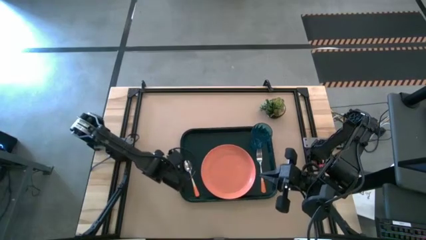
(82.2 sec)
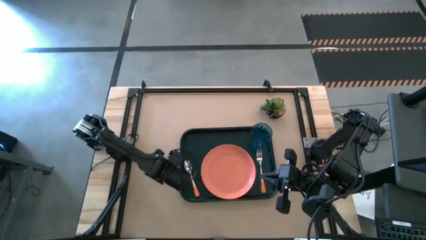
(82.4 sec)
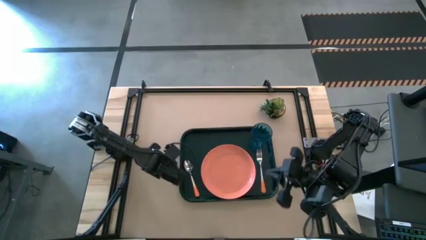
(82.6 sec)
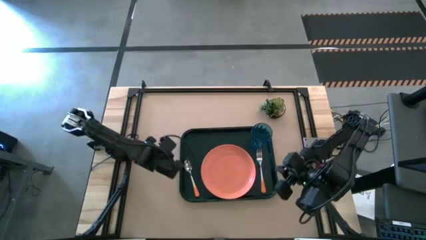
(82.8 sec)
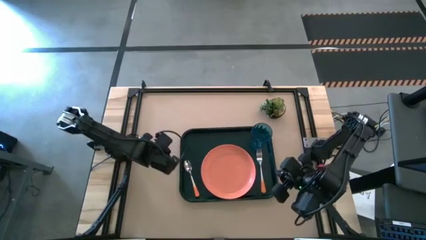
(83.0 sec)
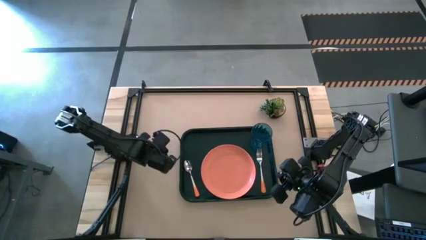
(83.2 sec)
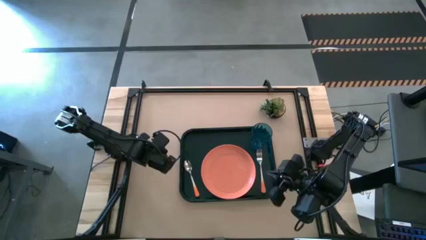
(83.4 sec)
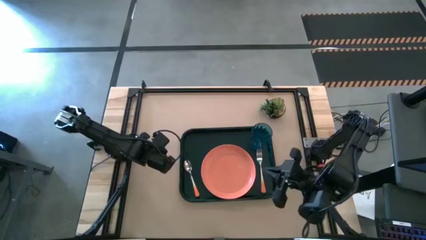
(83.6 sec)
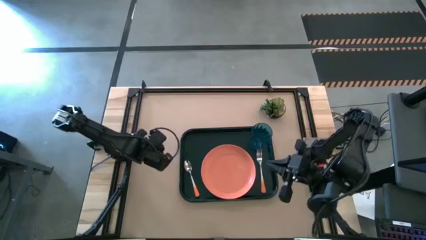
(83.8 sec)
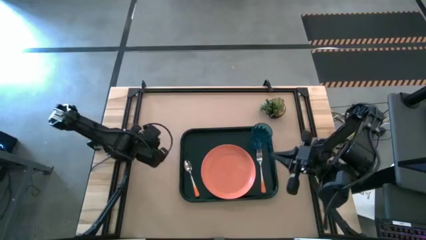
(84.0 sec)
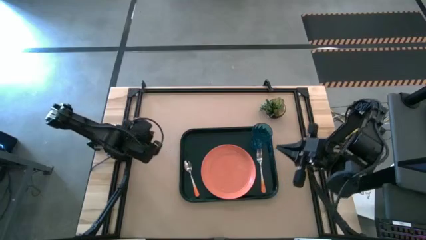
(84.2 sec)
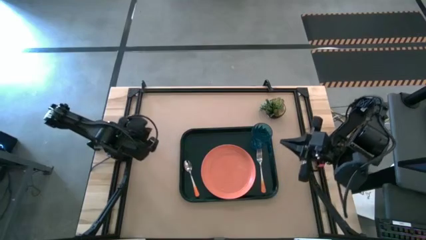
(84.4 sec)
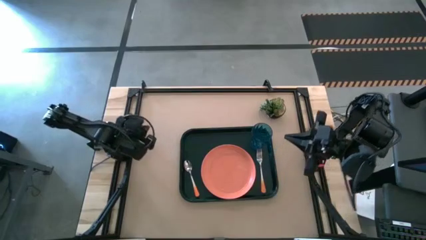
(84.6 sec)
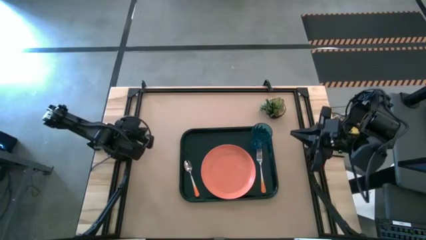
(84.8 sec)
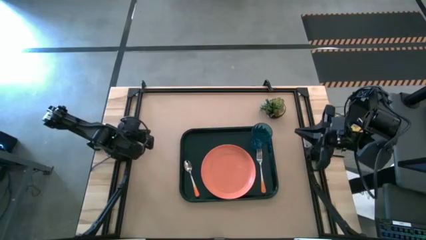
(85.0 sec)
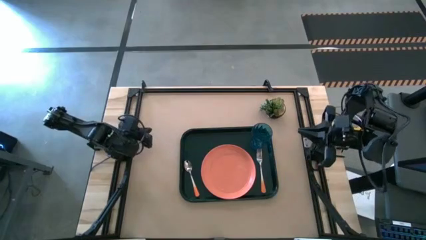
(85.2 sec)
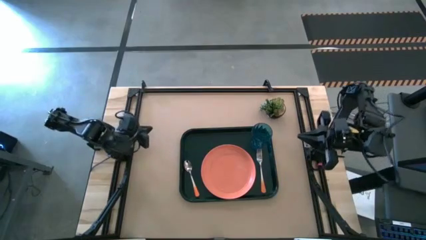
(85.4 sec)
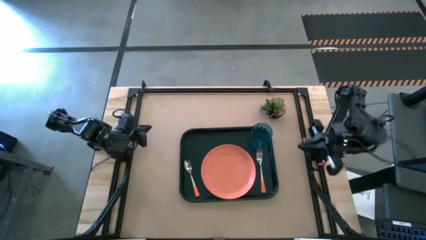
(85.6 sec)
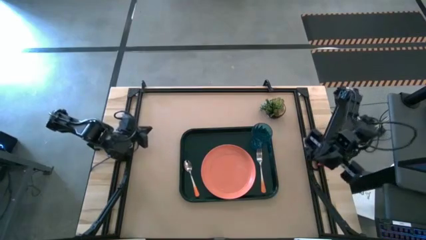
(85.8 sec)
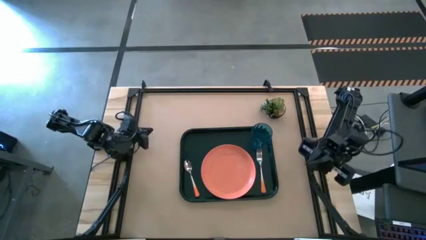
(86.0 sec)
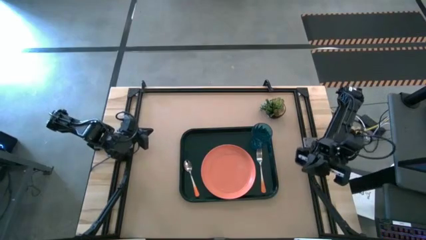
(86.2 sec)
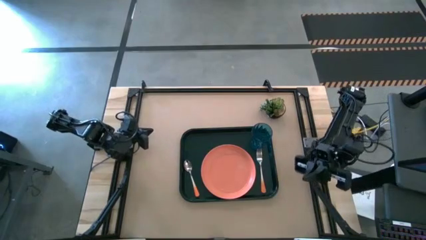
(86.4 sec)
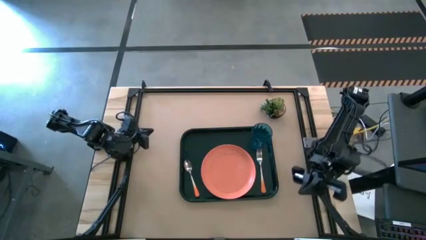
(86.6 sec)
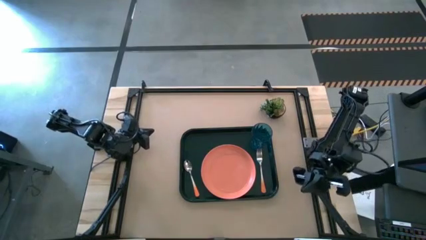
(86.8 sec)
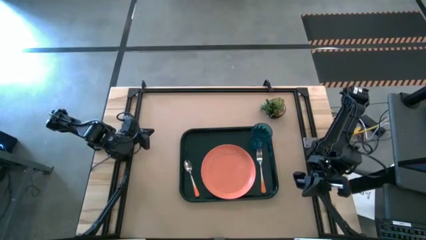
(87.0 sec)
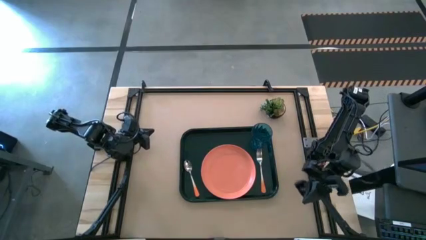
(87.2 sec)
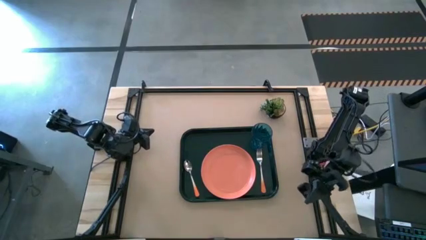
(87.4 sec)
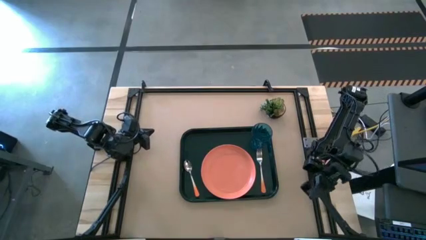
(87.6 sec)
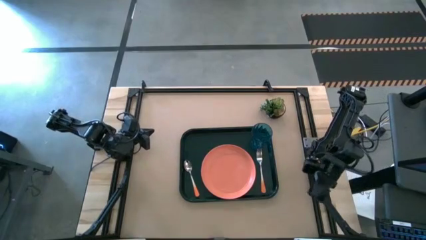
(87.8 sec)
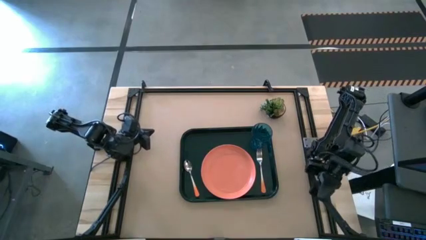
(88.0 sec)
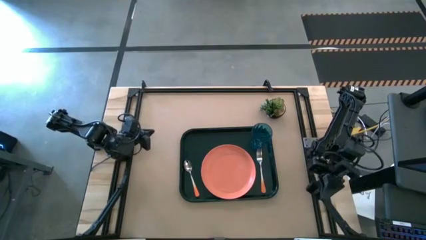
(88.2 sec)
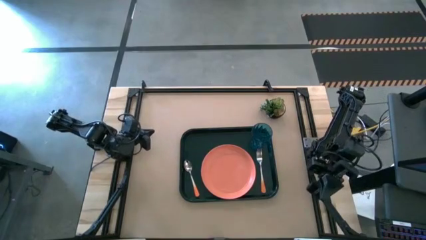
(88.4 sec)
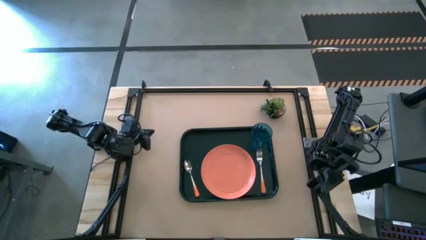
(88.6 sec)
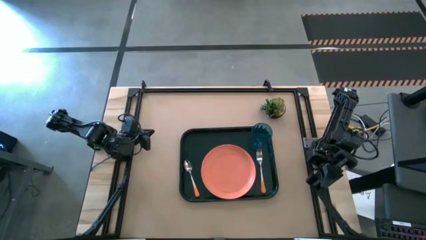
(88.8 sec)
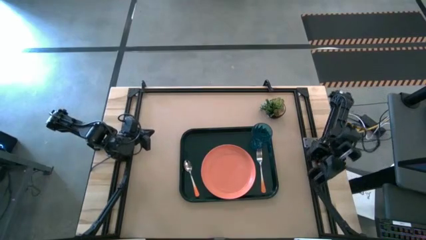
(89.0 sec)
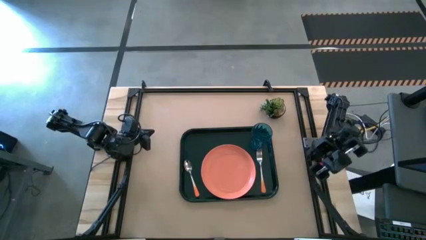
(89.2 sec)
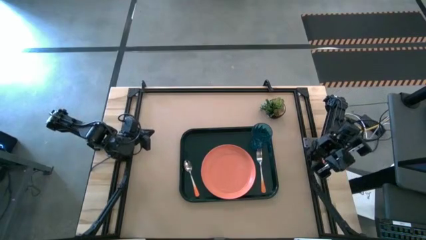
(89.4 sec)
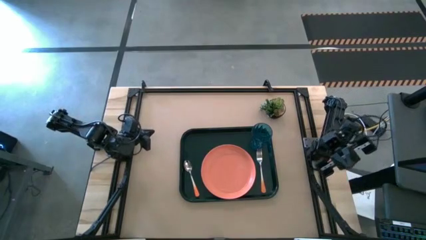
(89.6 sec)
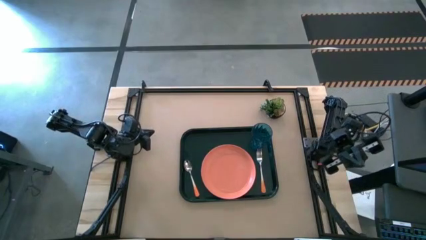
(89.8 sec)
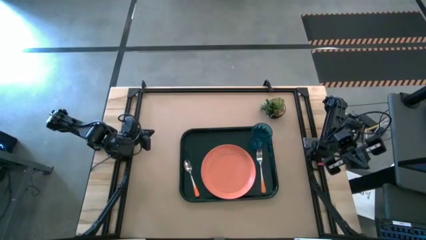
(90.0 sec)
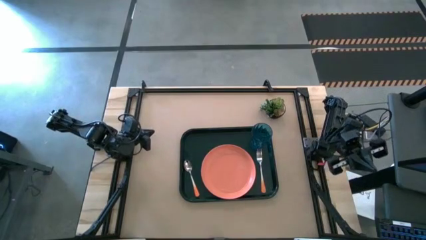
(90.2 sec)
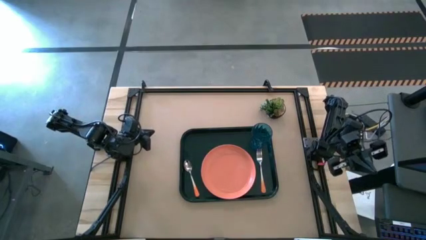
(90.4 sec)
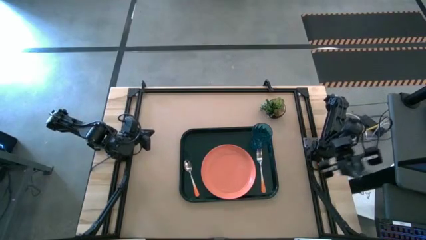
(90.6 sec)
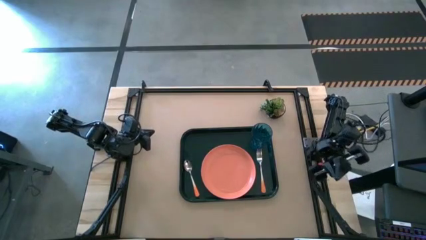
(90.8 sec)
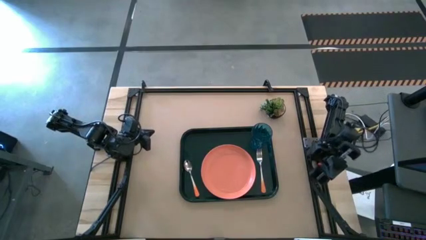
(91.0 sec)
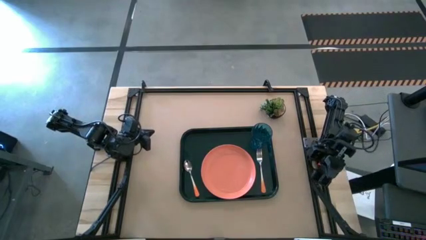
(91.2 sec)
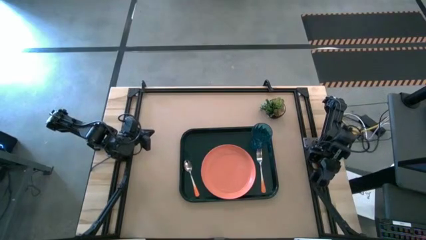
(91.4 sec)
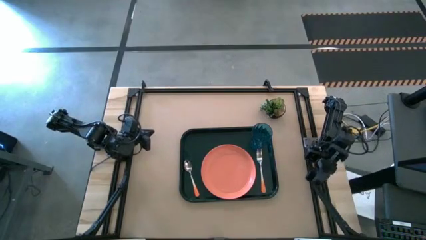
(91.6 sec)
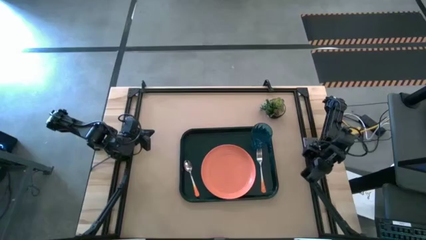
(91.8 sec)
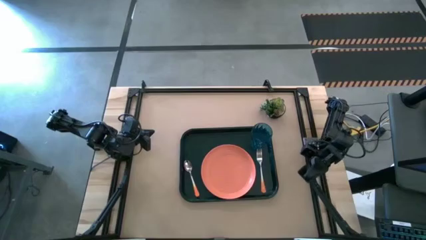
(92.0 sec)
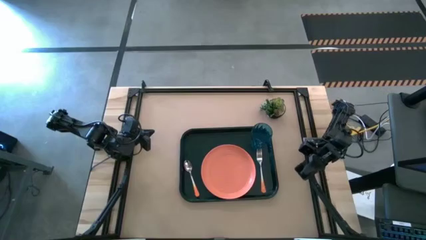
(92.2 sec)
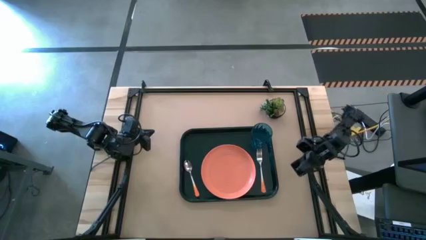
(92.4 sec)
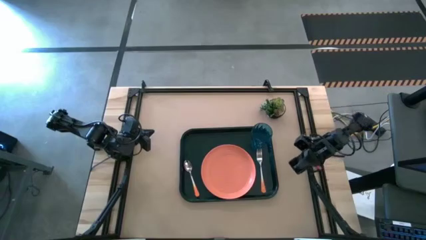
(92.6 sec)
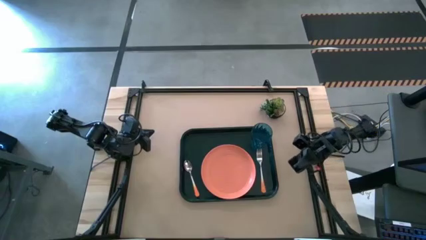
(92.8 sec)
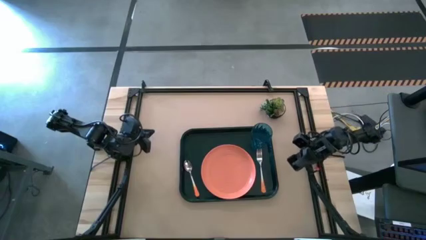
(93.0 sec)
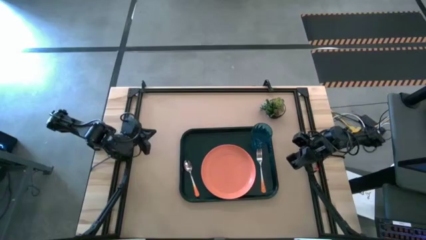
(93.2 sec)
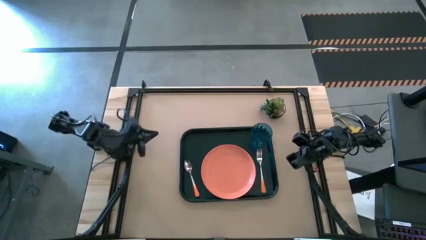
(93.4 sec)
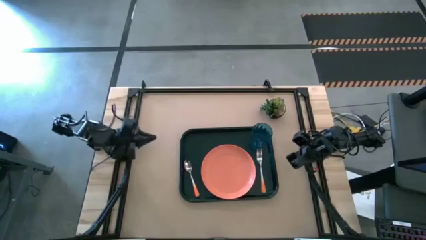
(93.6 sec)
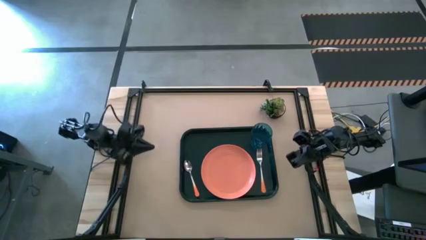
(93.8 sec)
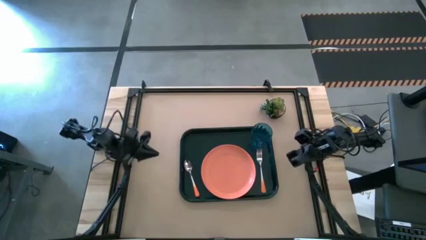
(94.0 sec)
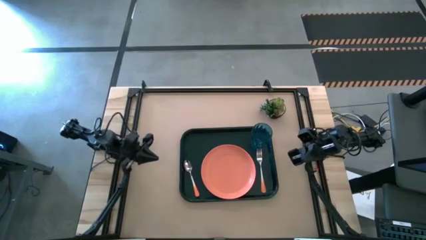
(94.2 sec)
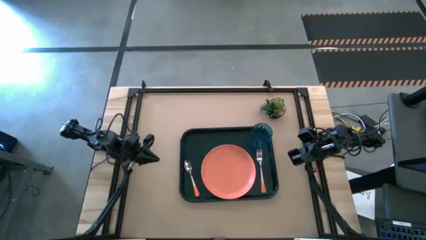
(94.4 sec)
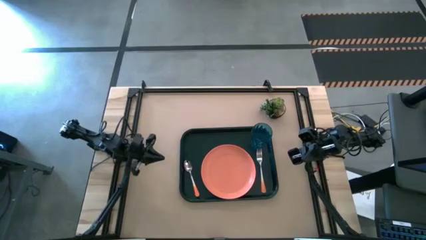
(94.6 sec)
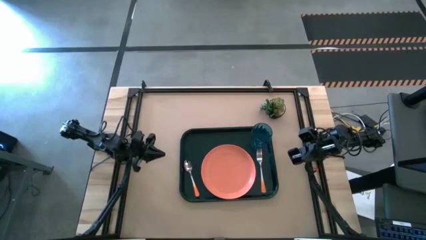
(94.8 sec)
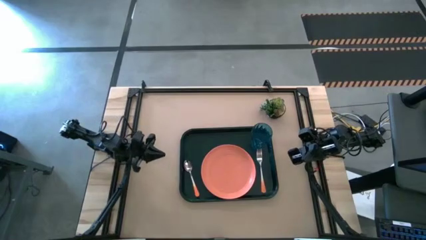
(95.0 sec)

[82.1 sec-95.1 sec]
Task: Pick and place plate/cup/fork/spoon on tray
Return to Home Position
